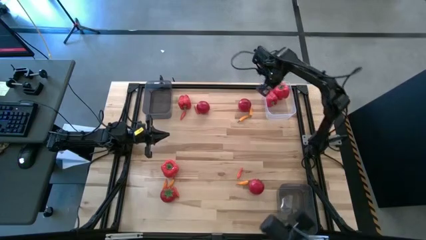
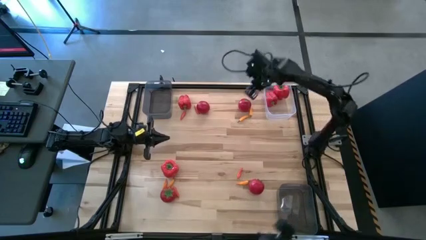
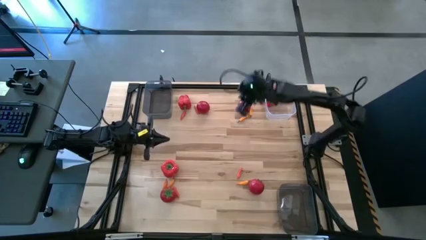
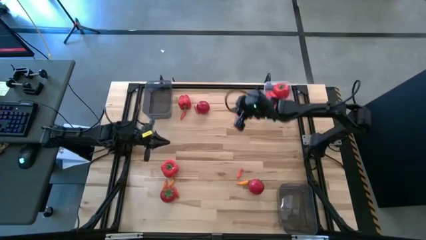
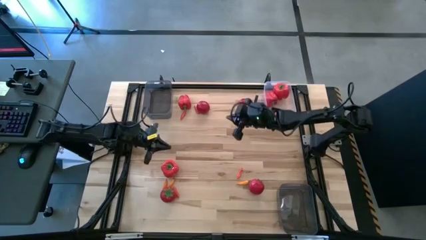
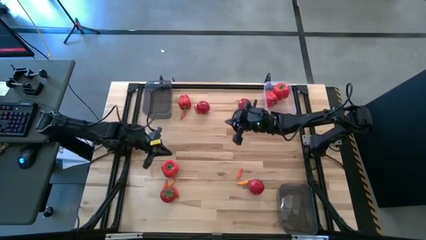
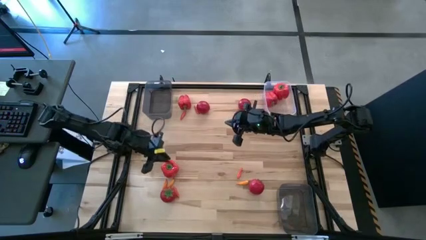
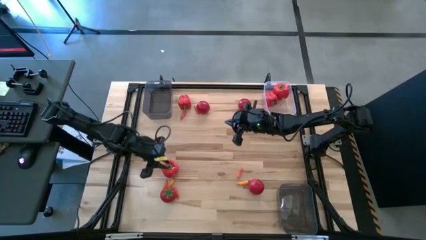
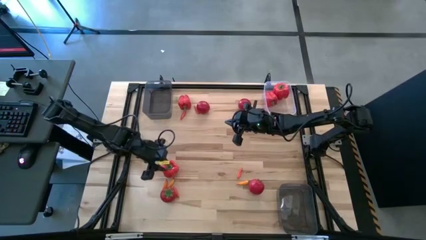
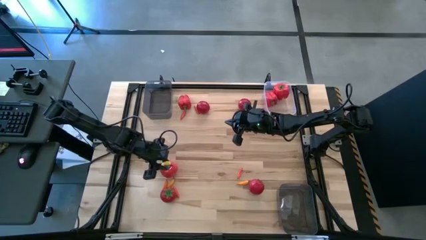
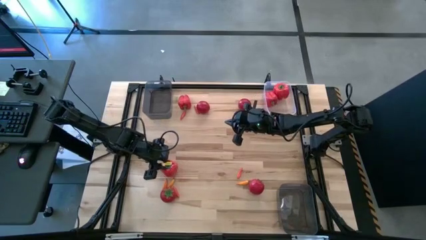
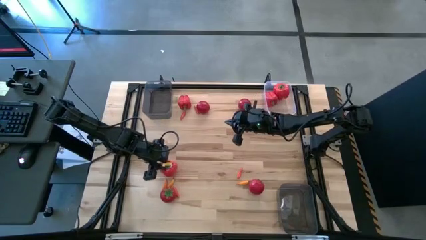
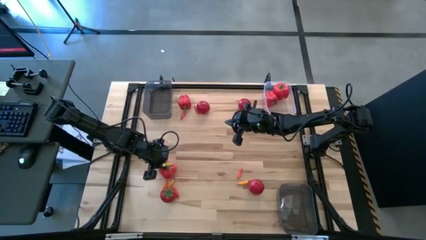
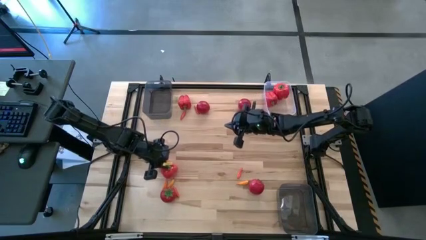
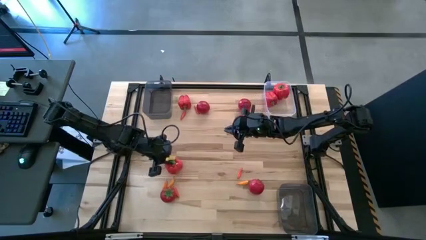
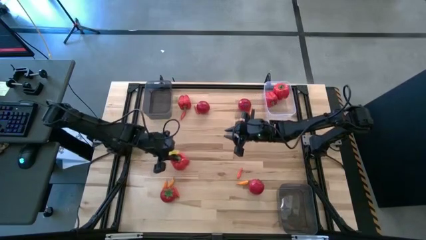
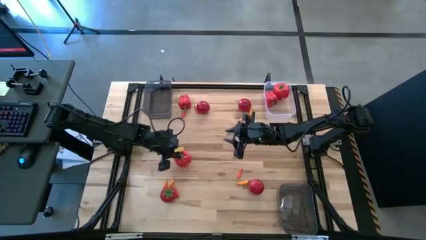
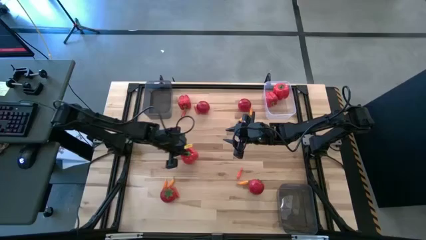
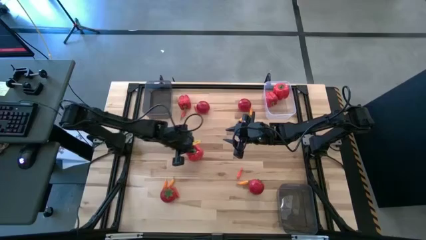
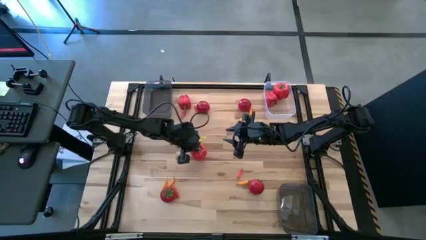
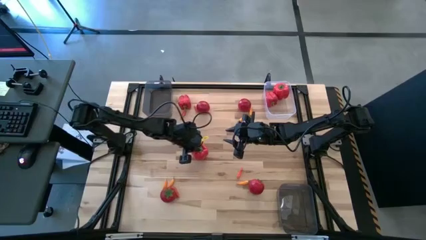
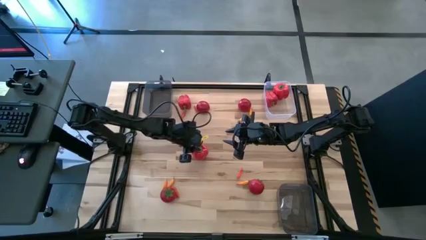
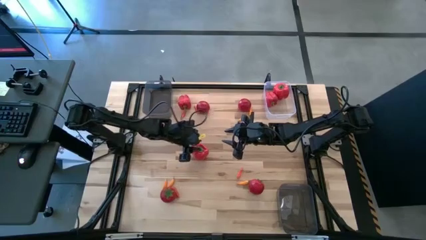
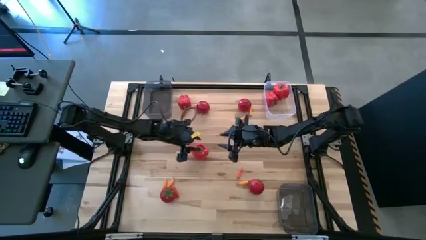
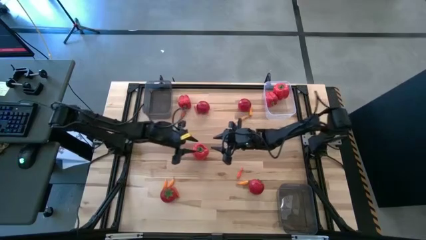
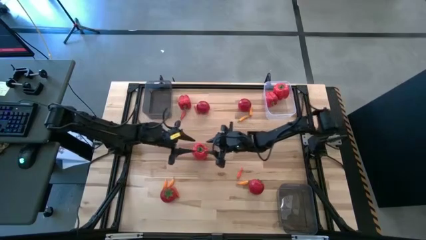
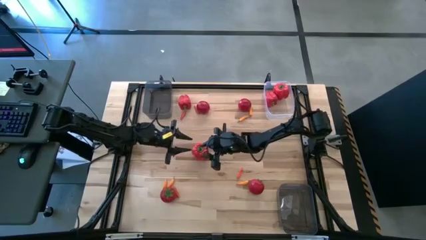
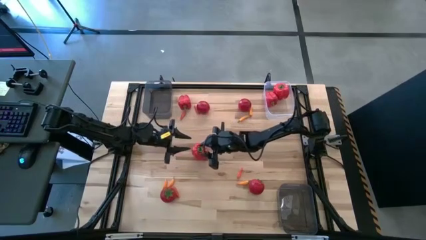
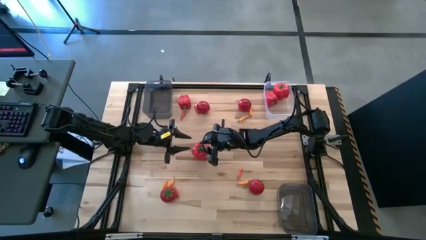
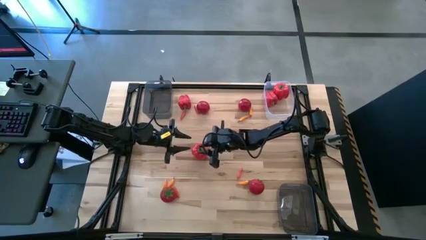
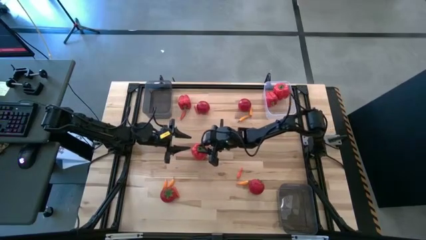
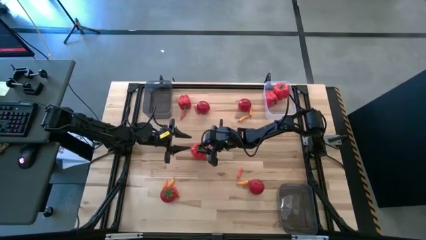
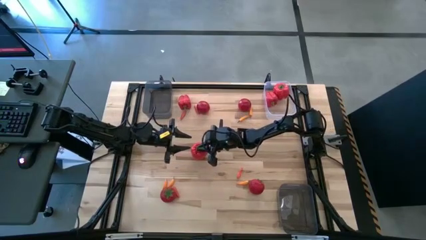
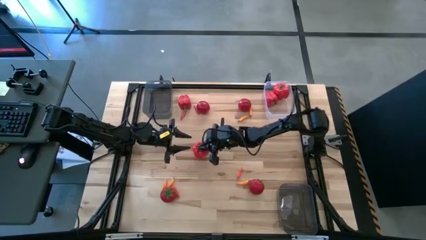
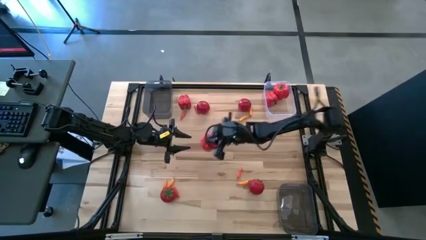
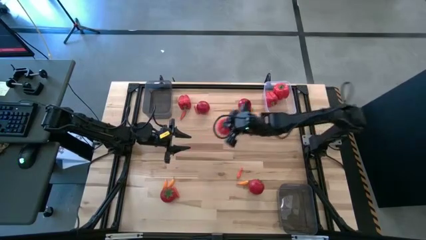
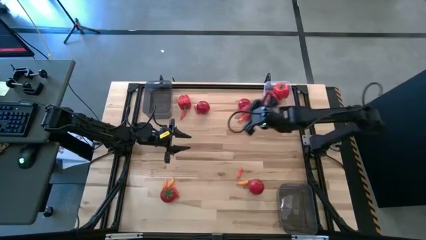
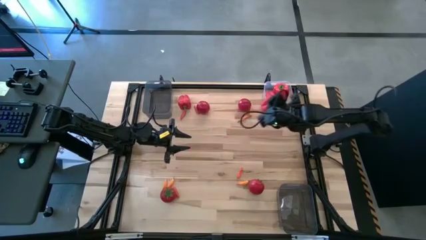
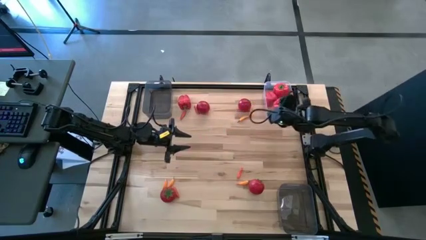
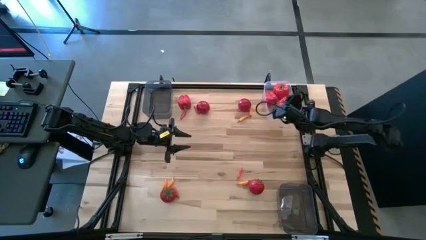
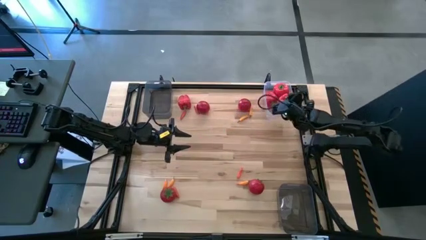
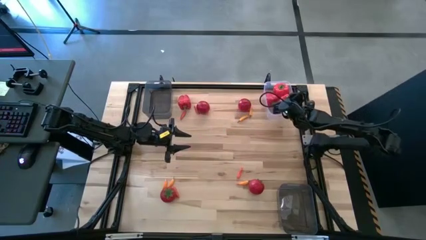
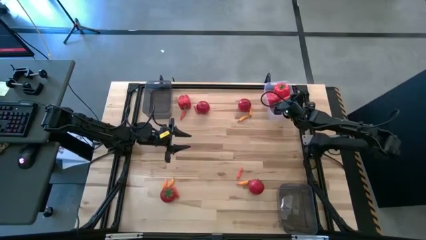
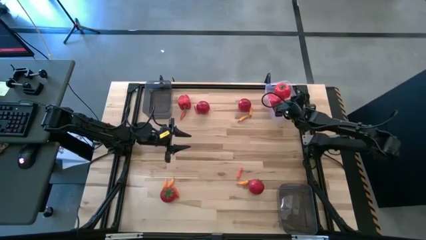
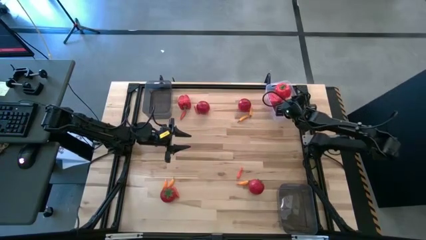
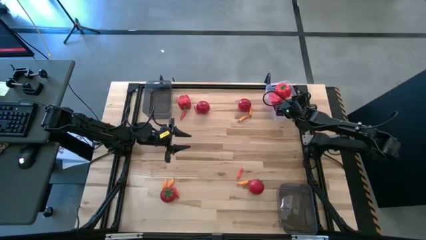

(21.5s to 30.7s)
Task: Sort produce into baskets
Put the red bell pepper into the transparent bin

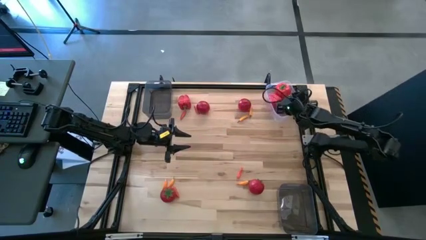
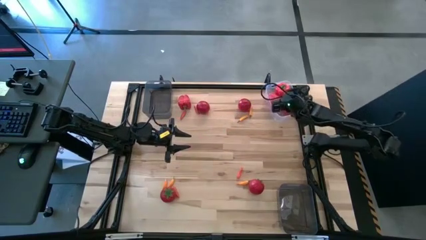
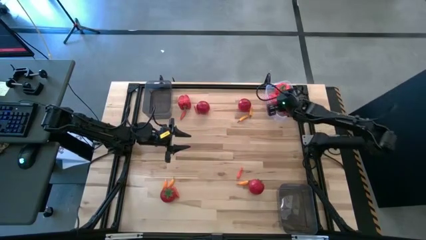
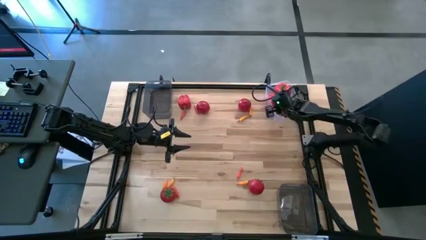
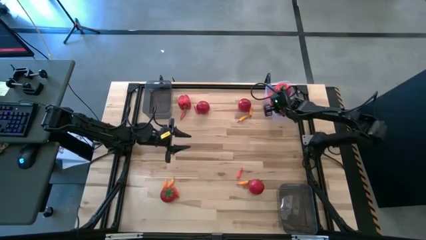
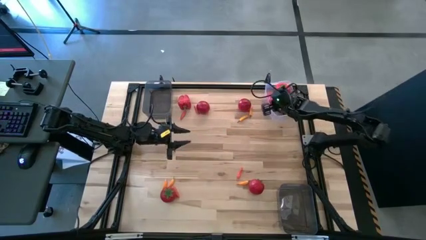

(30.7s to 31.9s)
Adjust the red bell pepper in the transparent bin
